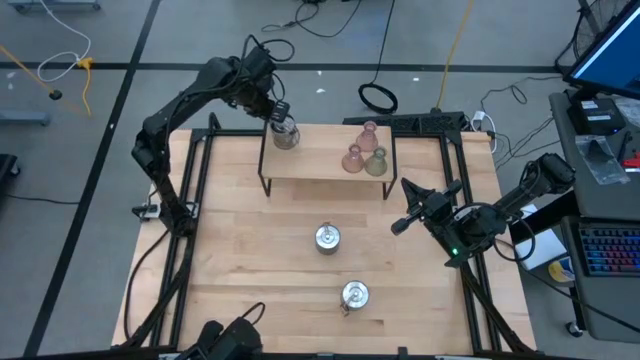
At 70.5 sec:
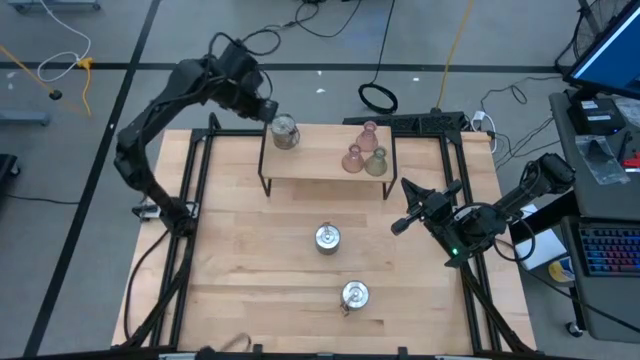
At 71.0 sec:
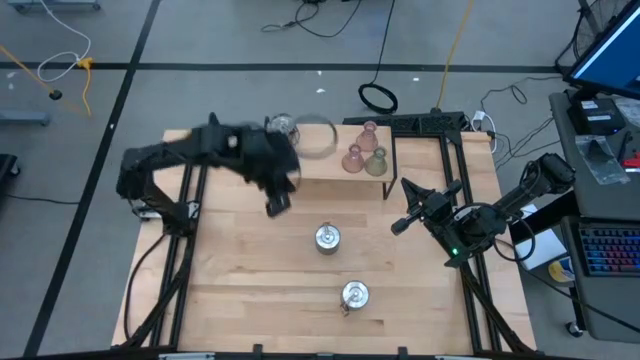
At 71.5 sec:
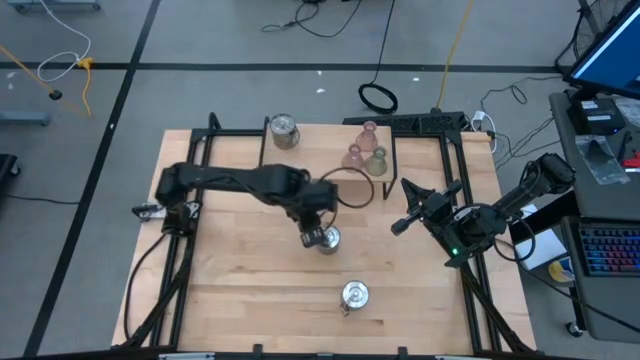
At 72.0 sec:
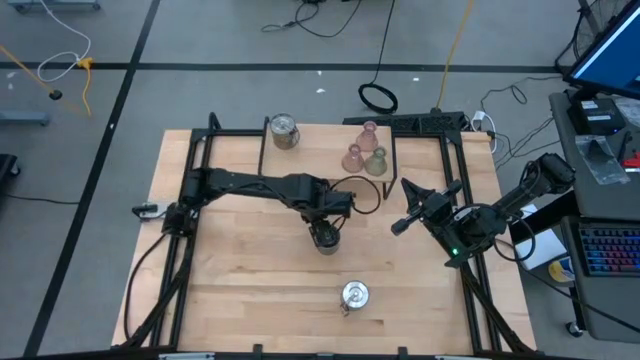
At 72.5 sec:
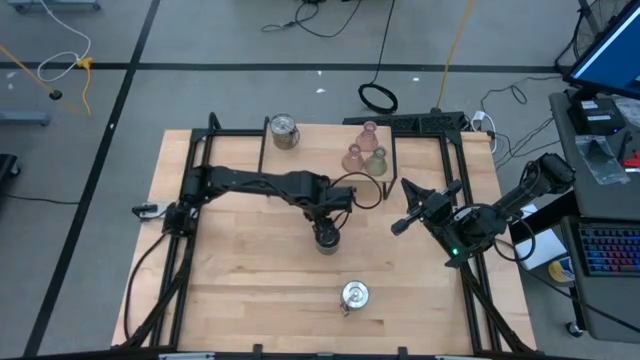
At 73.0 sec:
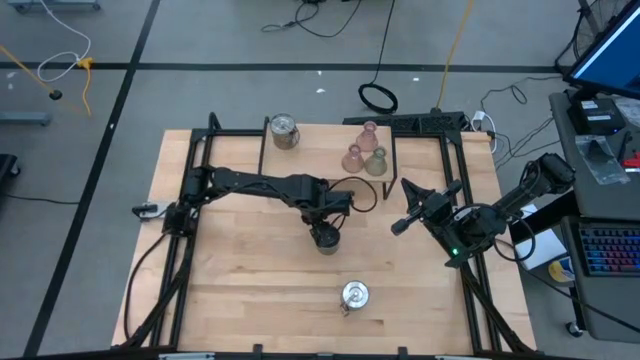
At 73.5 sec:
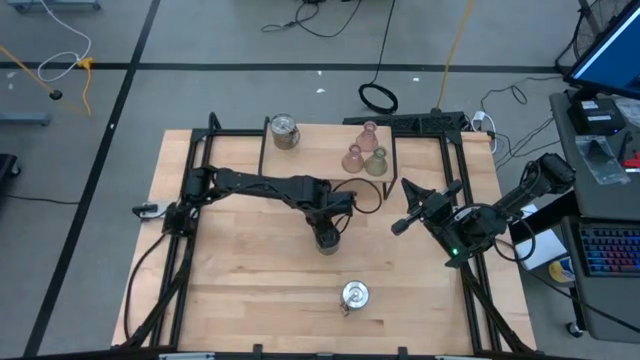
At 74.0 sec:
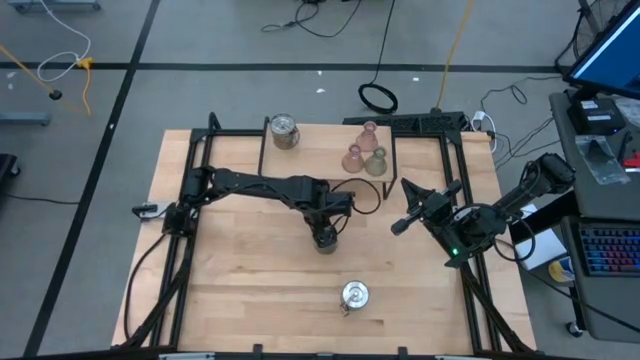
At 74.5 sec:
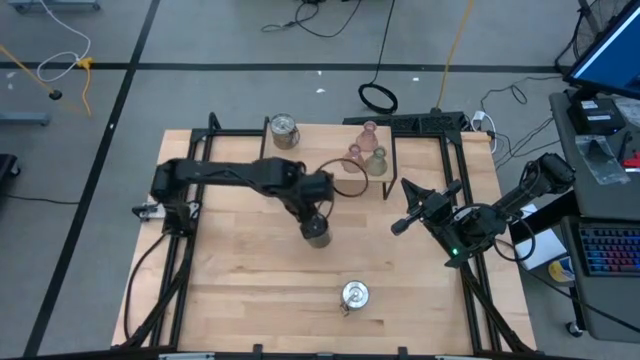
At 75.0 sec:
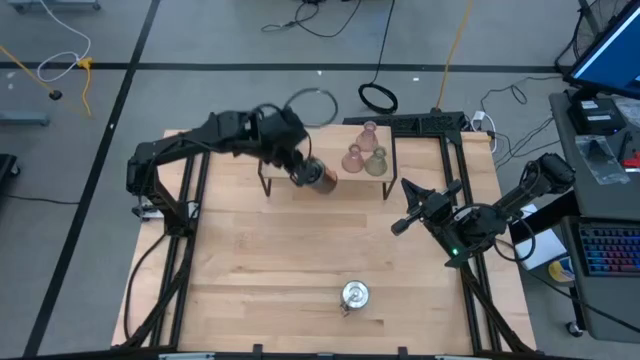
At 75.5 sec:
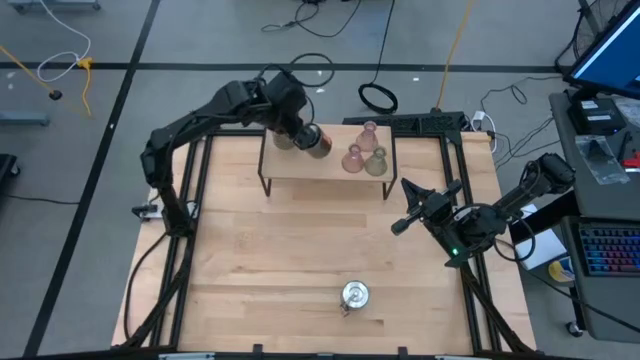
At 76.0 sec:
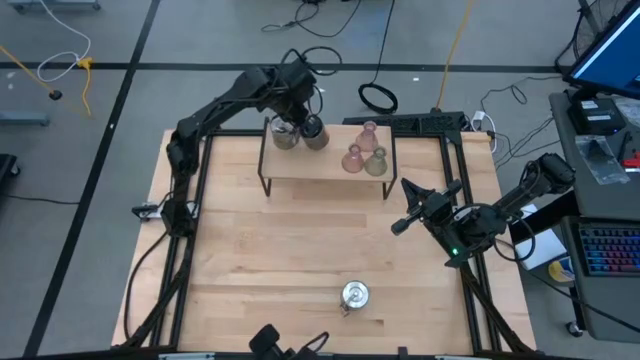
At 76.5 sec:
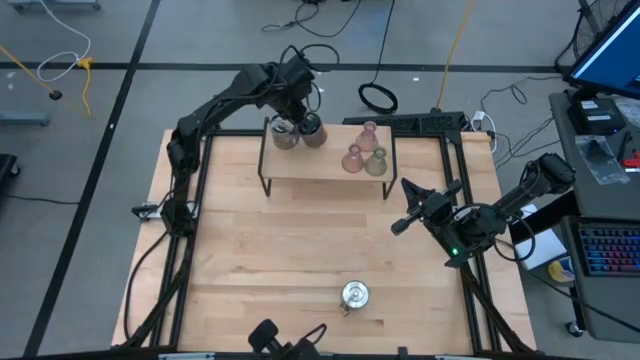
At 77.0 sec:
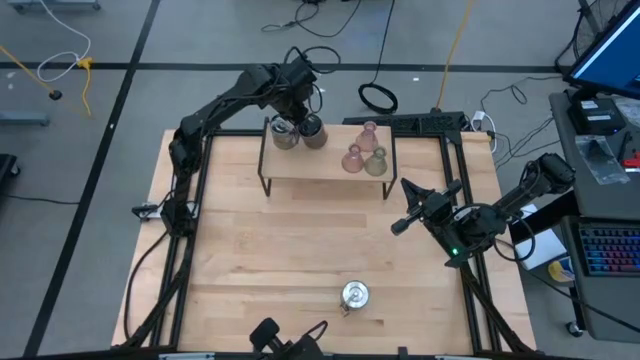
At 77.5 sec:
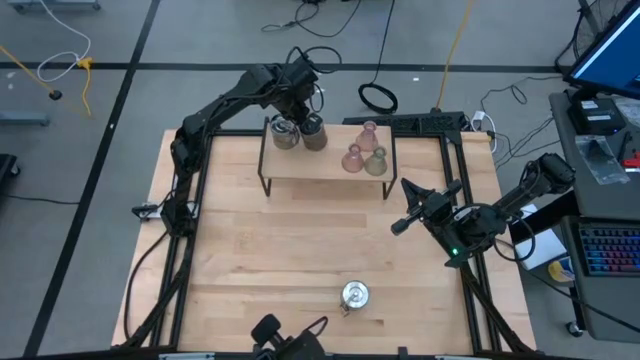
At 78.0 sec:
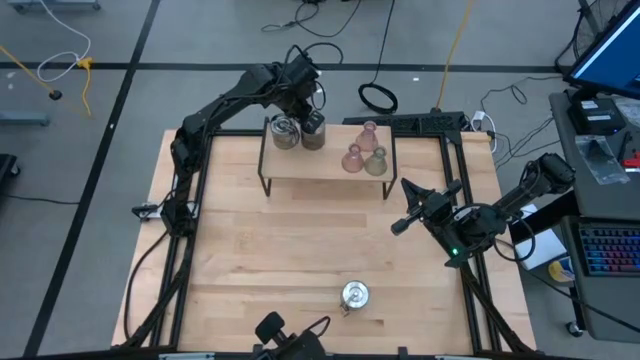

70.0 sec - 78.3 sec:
Task: Pick & Place candle stick holders
Put the top scented candle on the shelf

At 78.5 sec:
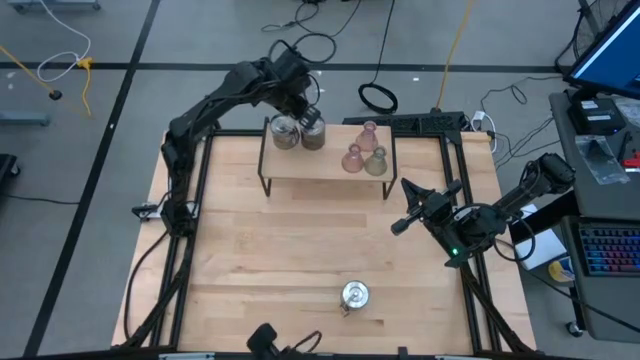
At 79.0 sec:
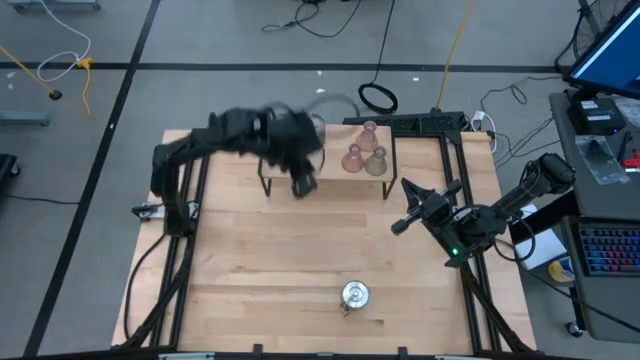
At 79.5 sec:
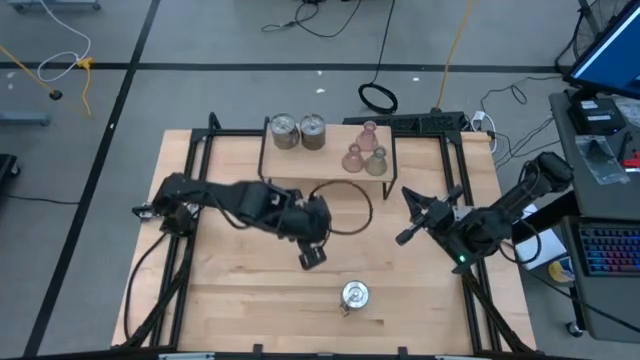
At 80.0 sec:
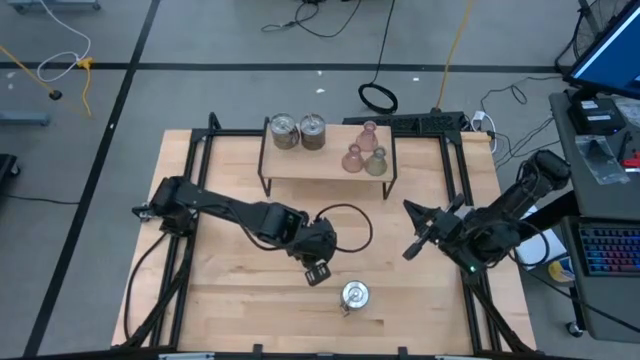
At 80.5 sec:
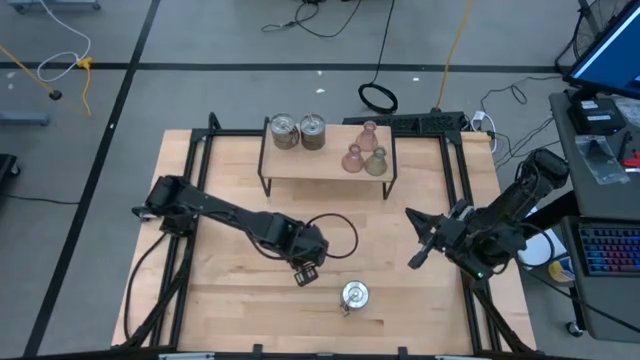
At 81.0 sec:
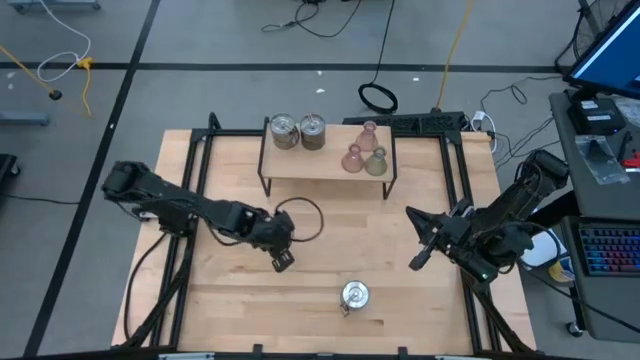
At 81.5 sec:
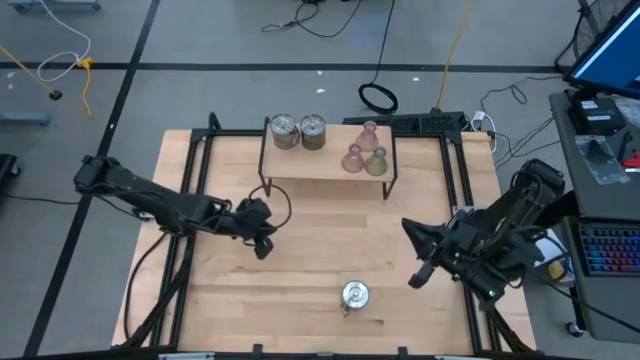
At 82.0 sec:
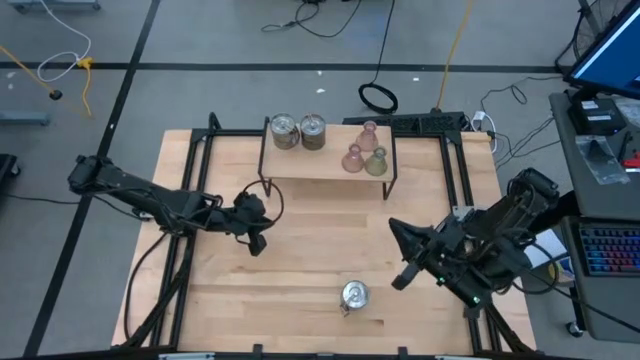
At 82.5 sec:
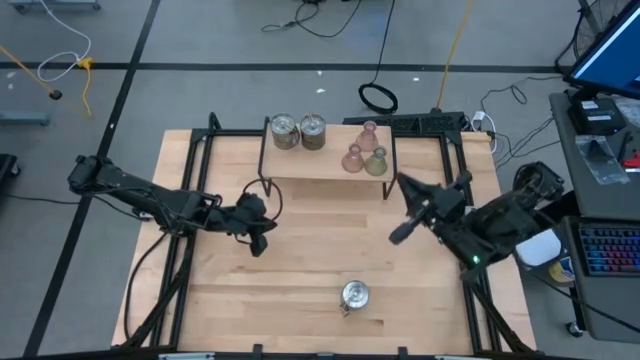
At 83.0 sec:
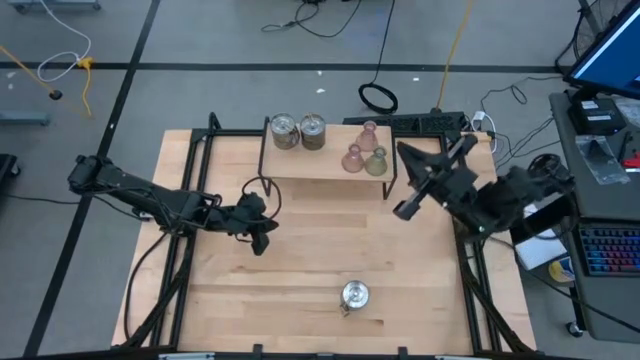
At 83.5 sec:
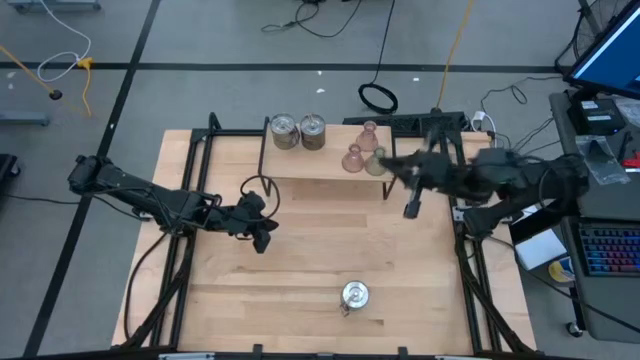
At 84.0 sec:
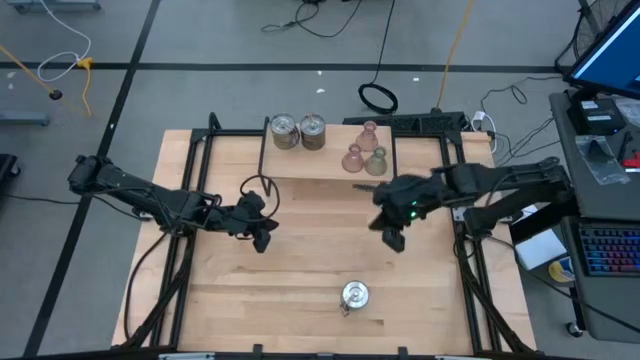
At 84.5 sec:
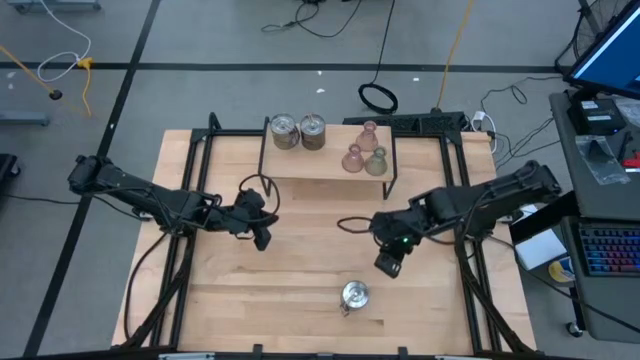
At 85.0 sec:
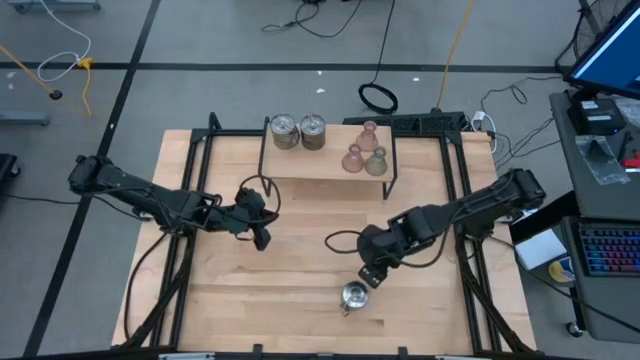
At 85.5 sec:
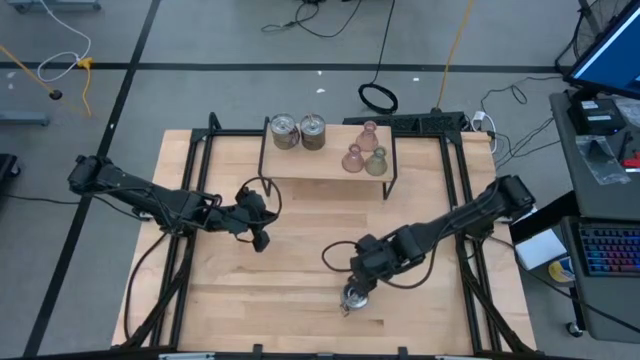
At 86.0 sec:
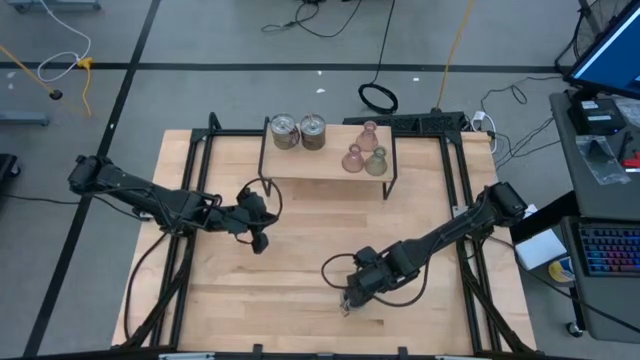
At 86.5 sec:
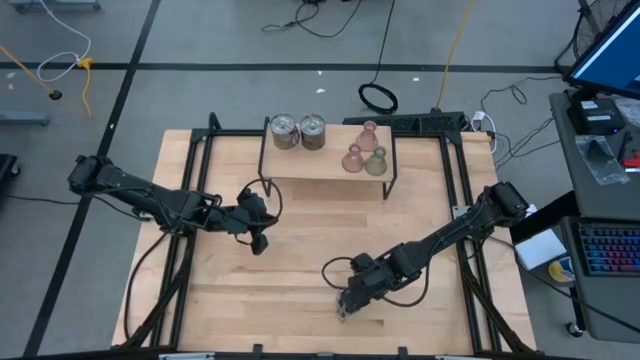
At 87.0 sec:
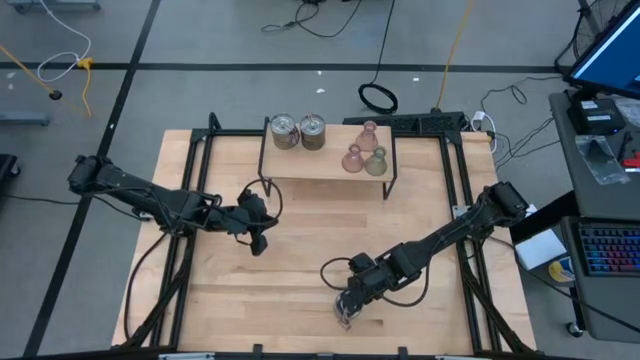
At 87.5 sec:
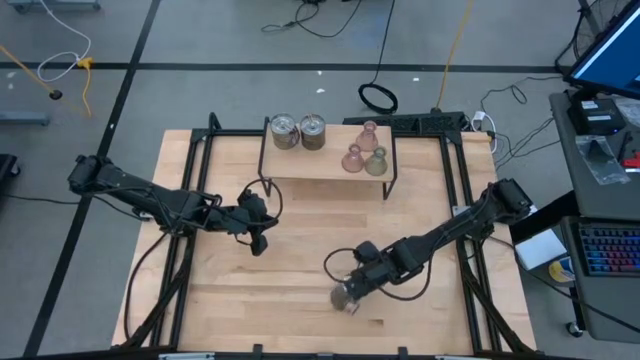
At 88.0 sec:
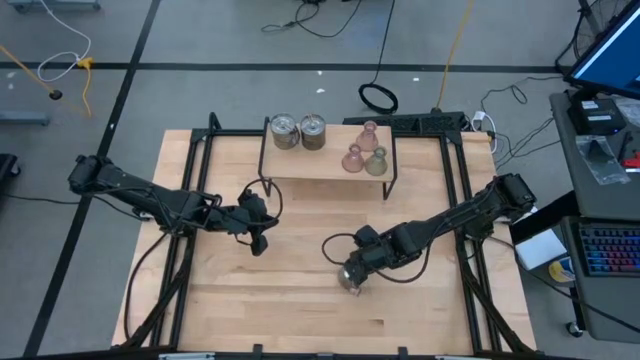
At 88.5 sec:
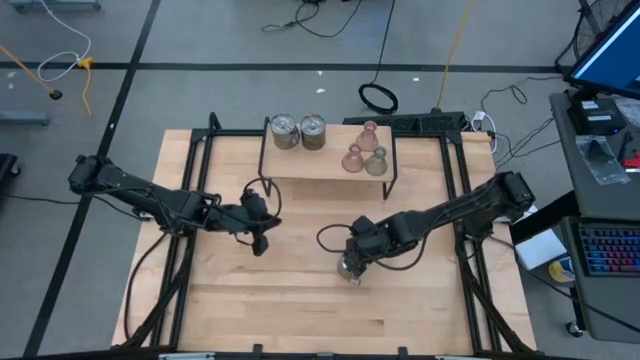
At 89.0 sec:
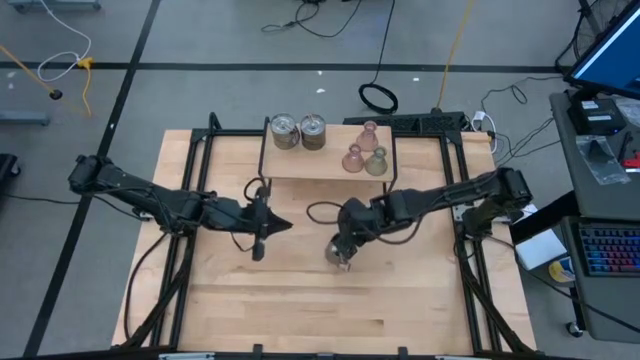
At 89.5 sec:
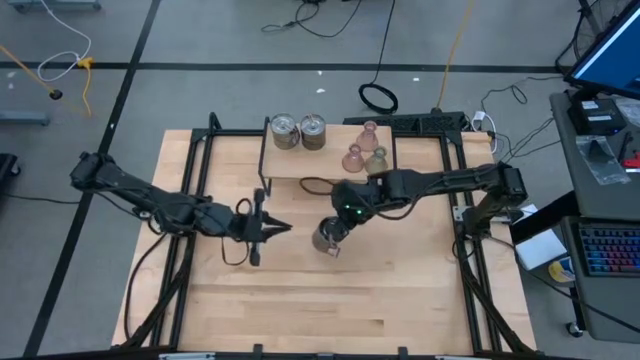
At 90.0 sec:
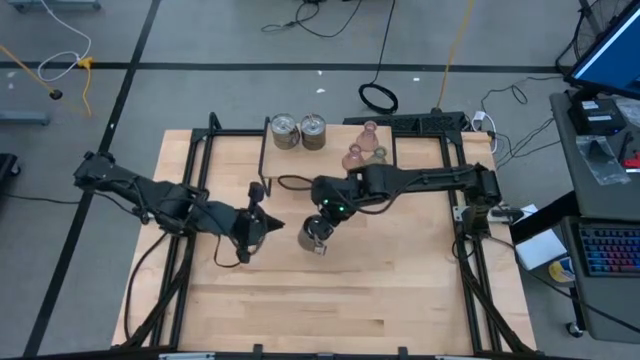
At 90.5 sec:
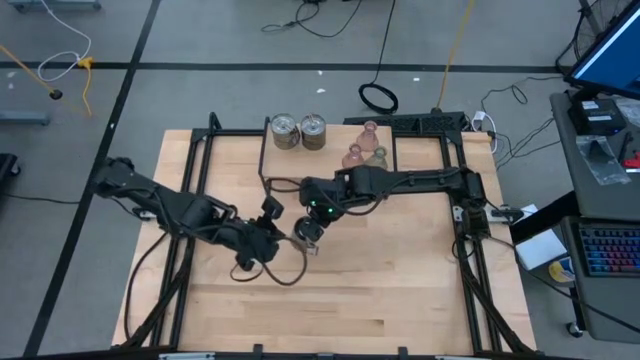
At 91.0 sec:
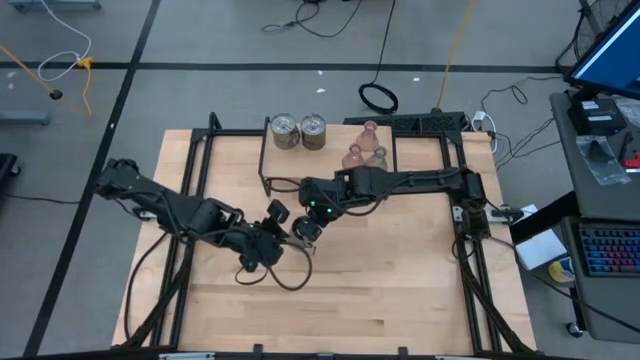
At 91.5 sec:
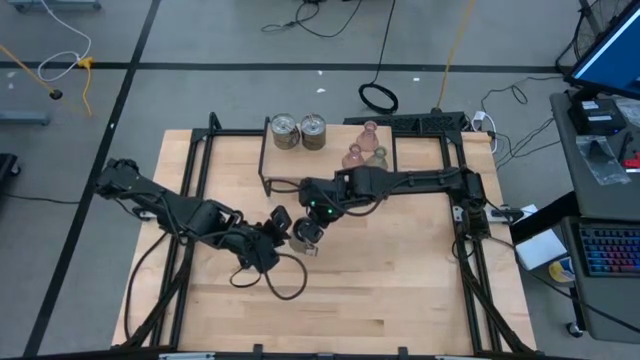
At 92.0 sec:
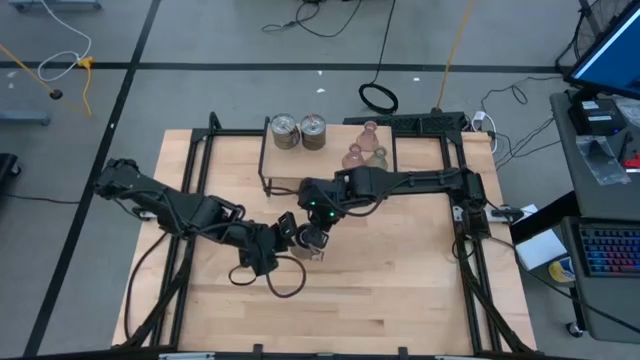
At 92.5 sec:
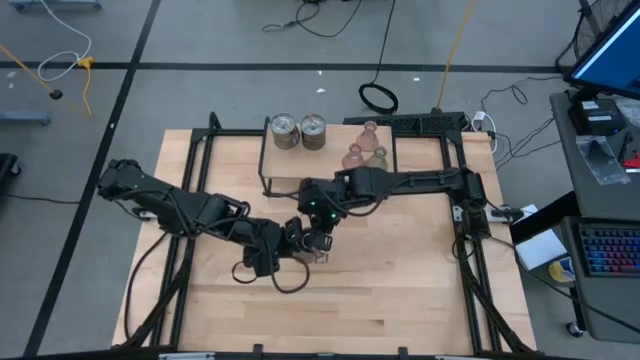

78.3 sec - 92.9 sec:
Put the scented candle on the shelf
